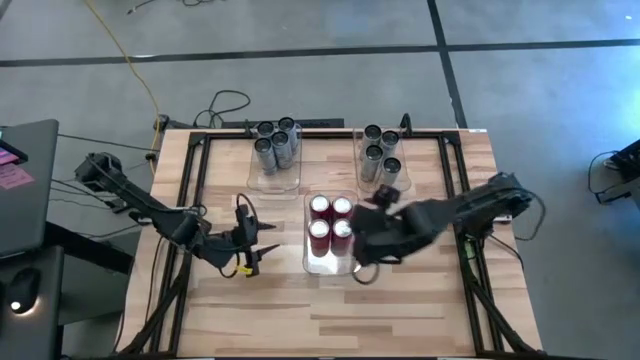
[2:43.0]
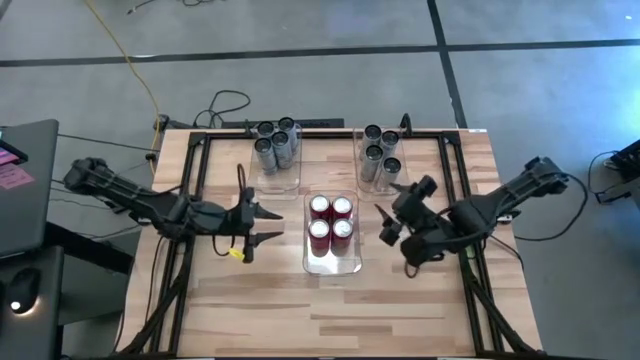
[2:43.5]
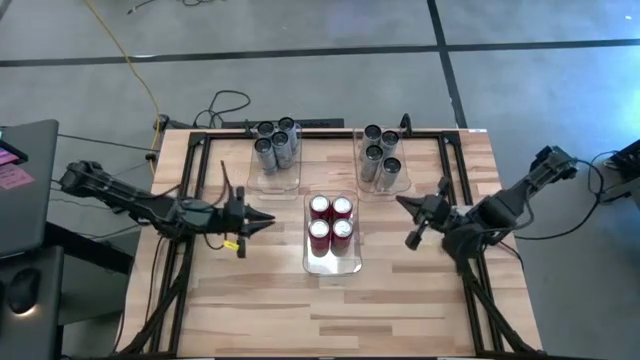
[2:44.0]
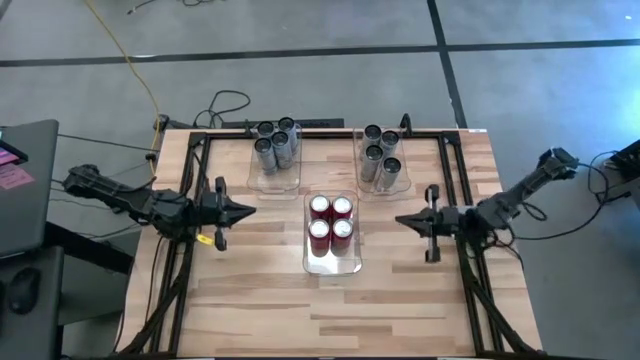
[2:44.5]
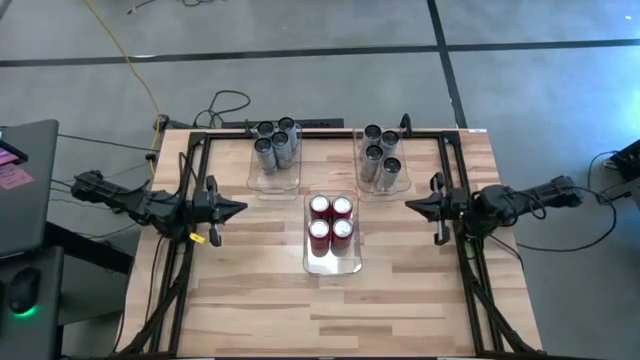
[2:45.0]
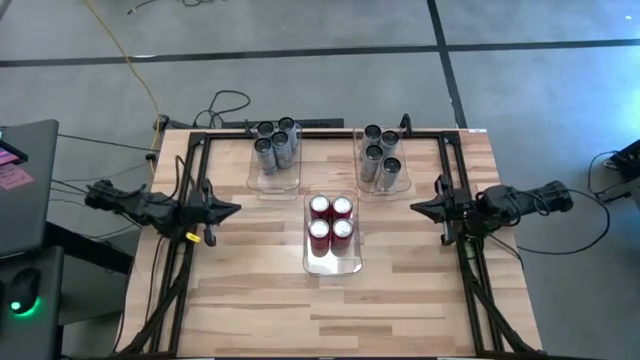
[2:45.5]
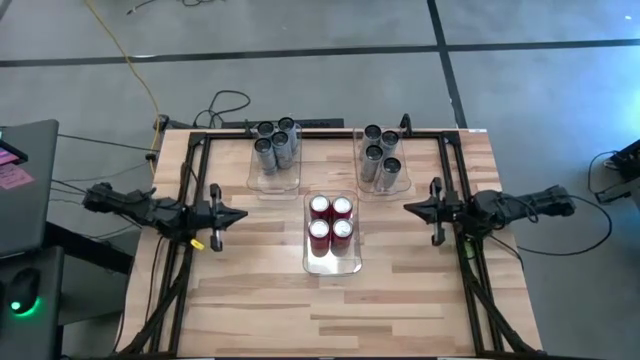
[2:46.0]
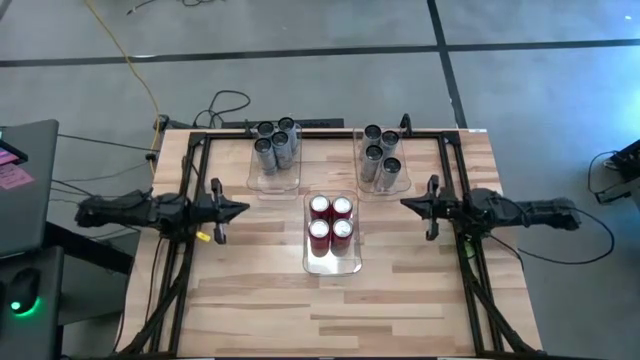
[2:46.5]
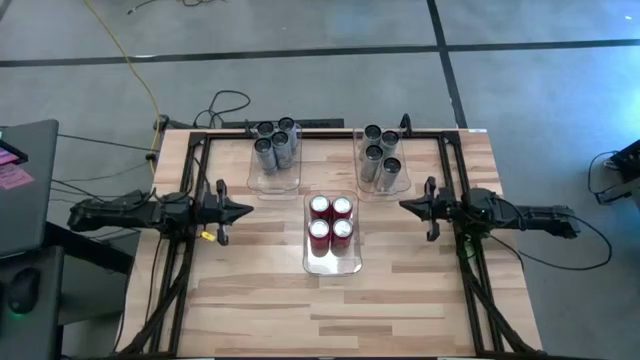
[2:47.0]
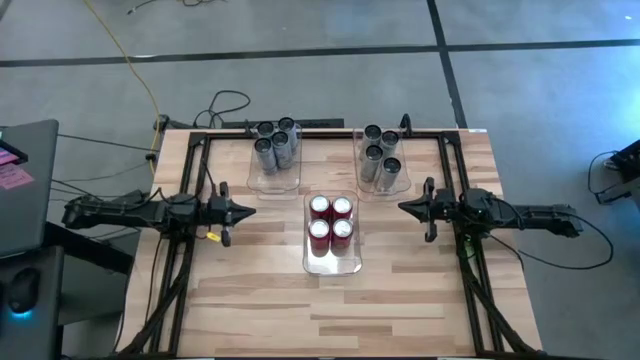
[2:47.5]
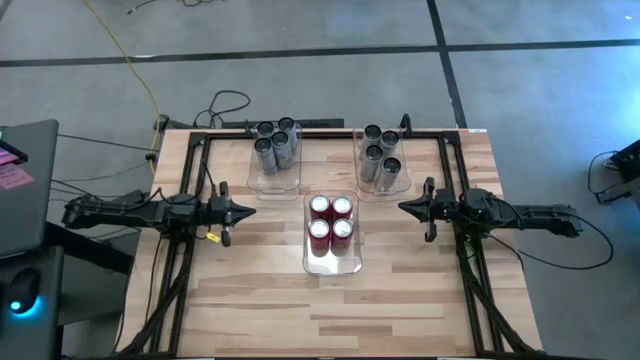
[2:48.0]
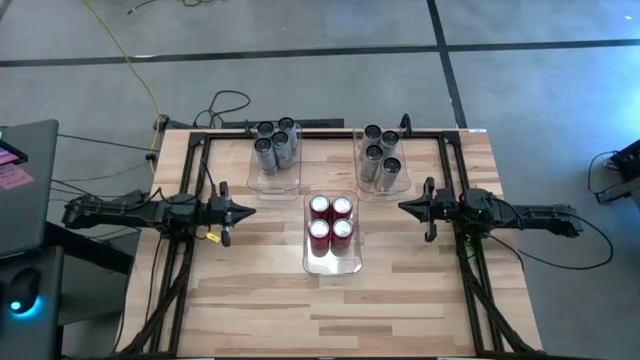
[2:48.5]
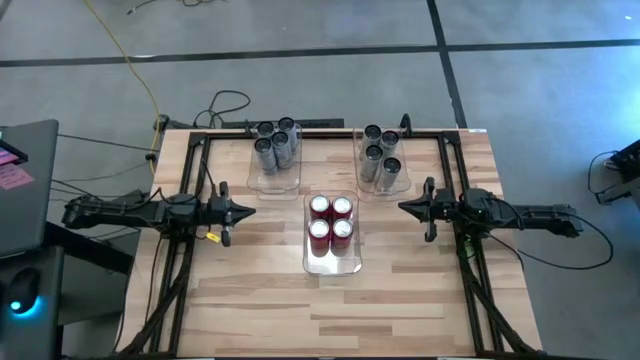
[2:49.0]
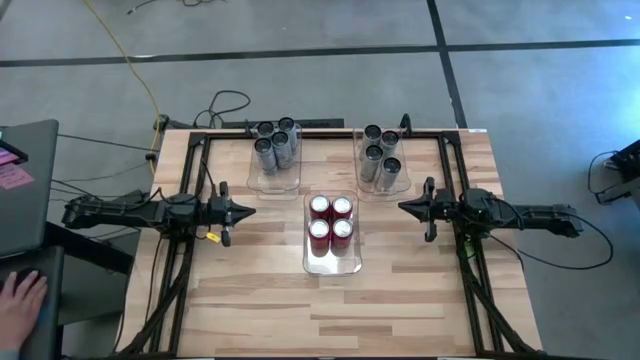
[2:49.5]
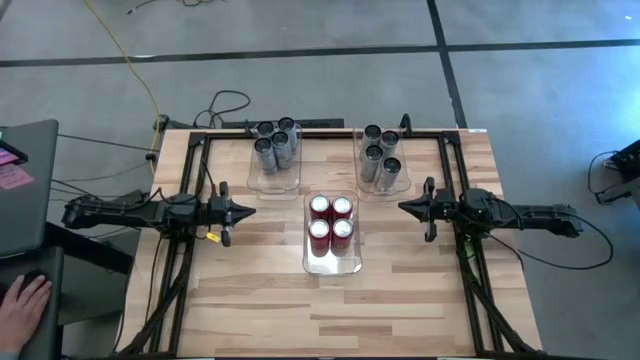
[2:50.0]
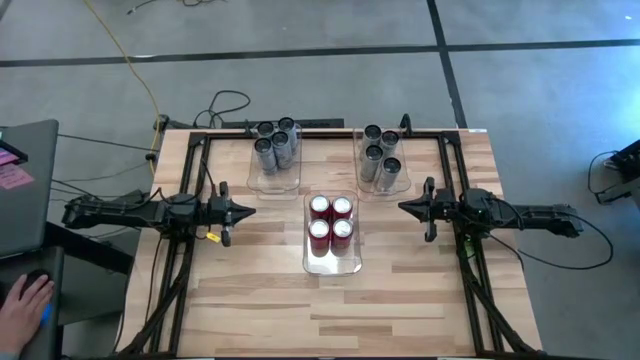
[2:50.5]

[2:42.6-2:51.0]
Task: Sort soda cans
Return to Home Position

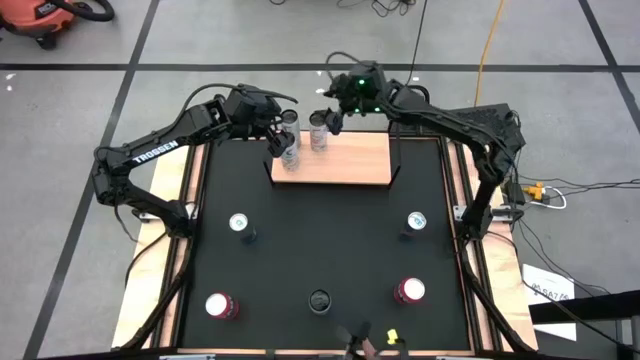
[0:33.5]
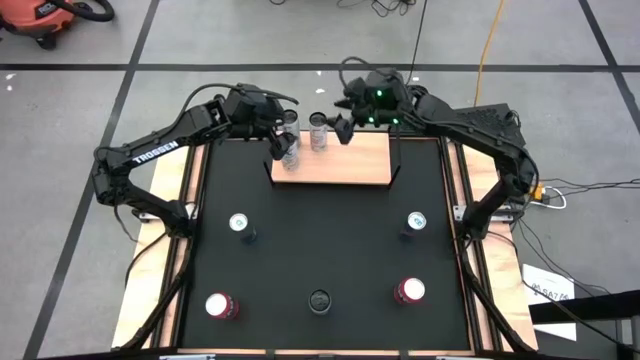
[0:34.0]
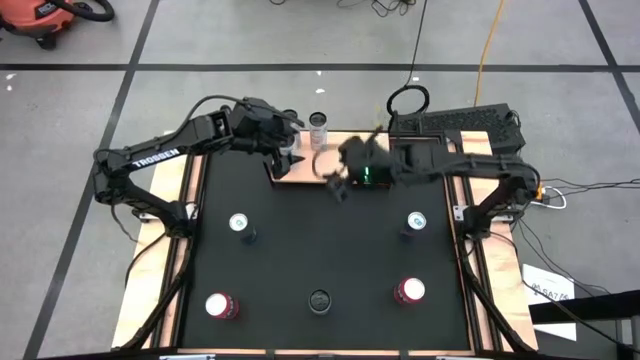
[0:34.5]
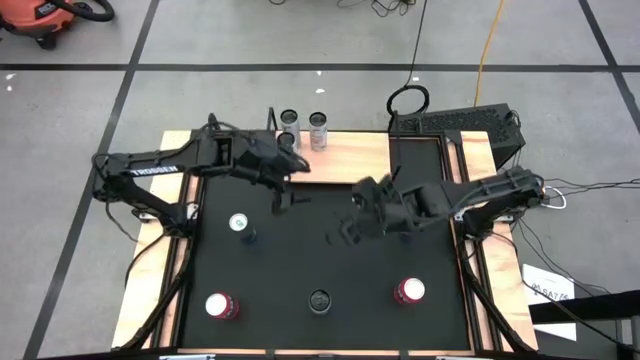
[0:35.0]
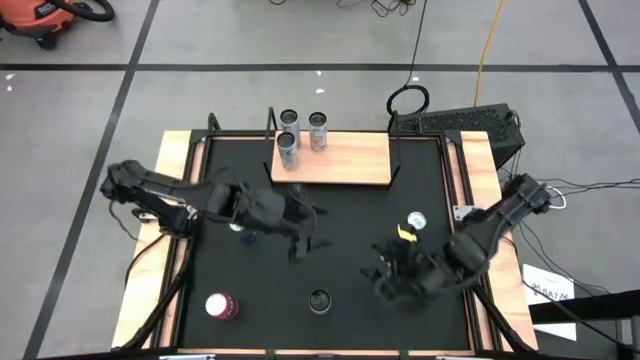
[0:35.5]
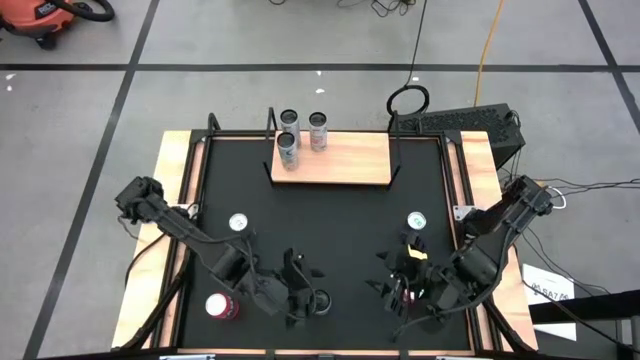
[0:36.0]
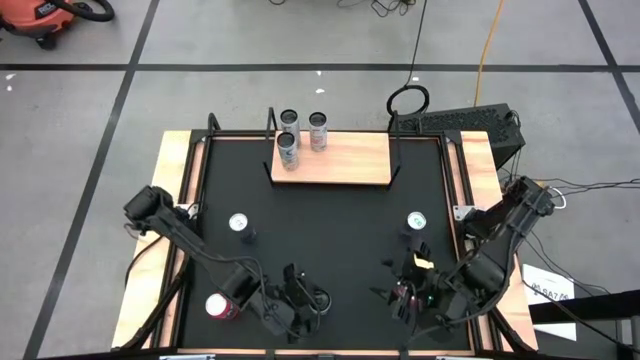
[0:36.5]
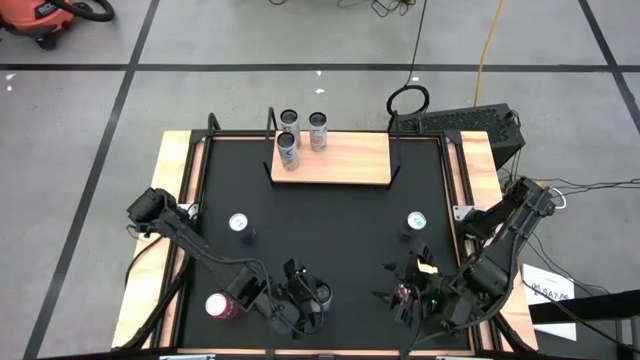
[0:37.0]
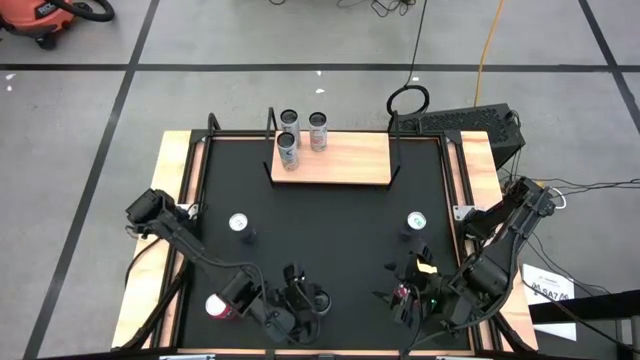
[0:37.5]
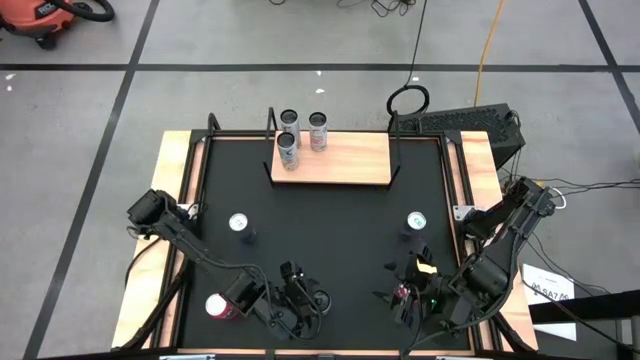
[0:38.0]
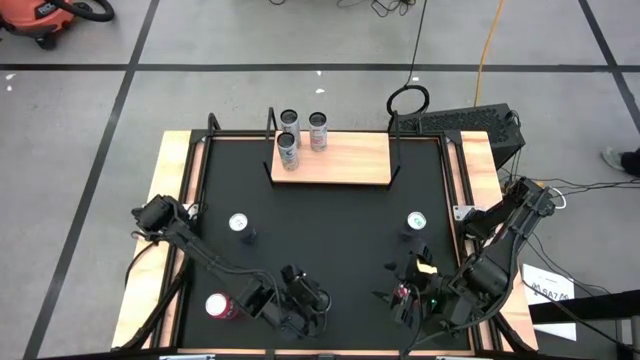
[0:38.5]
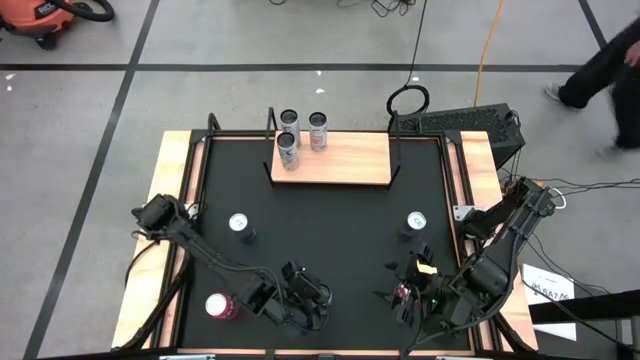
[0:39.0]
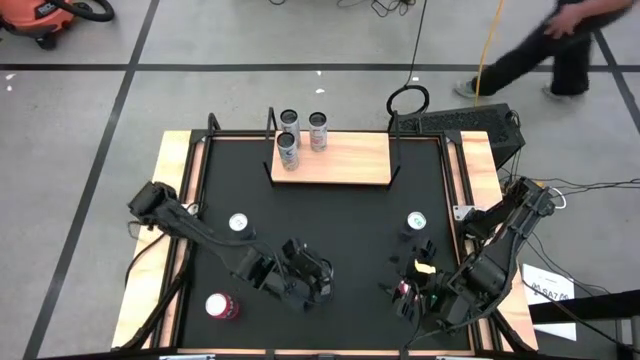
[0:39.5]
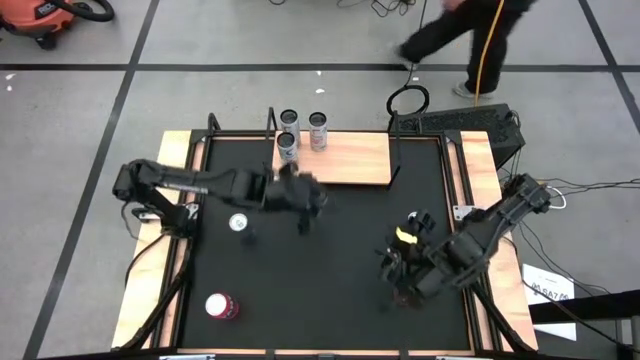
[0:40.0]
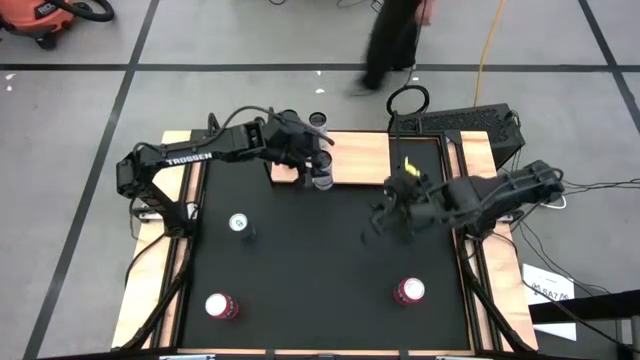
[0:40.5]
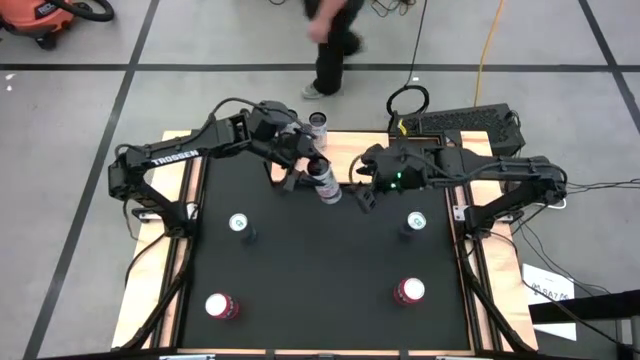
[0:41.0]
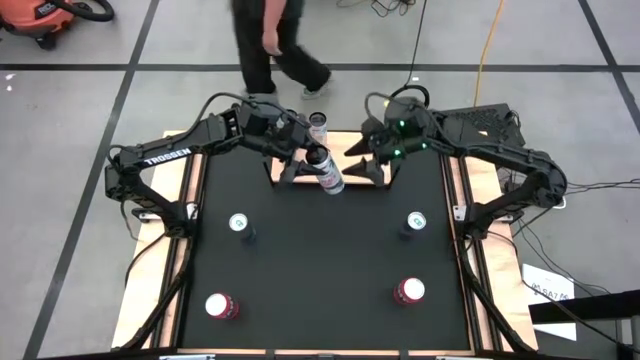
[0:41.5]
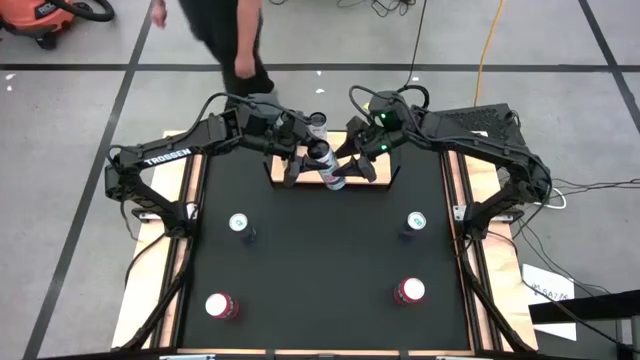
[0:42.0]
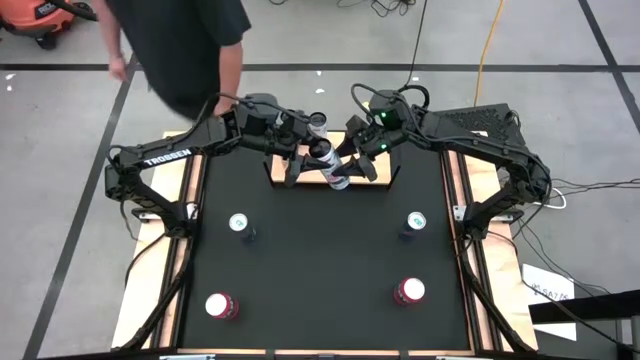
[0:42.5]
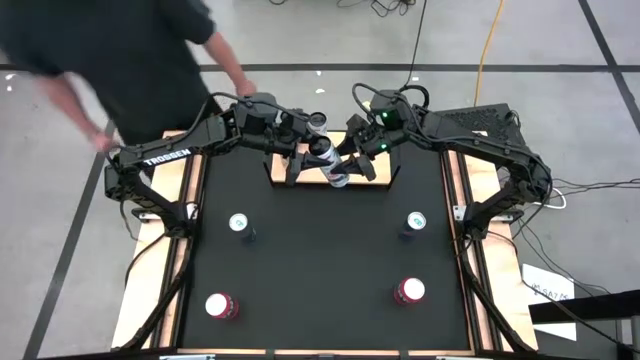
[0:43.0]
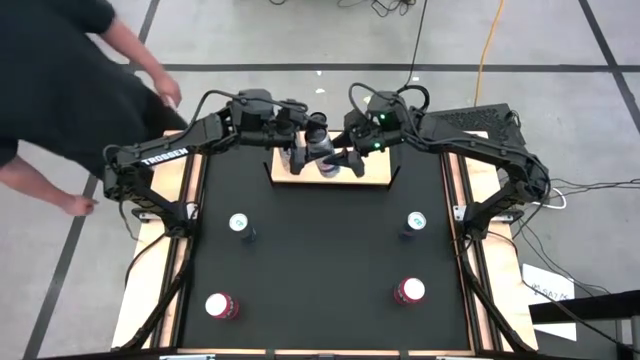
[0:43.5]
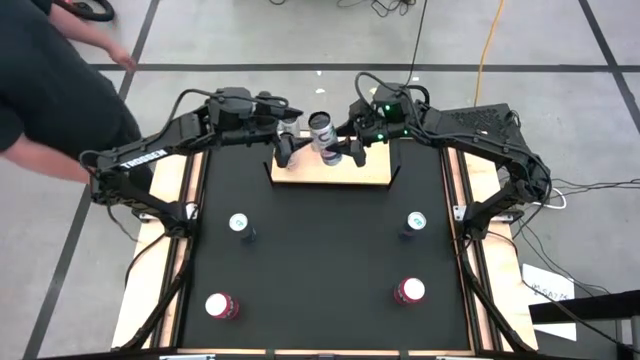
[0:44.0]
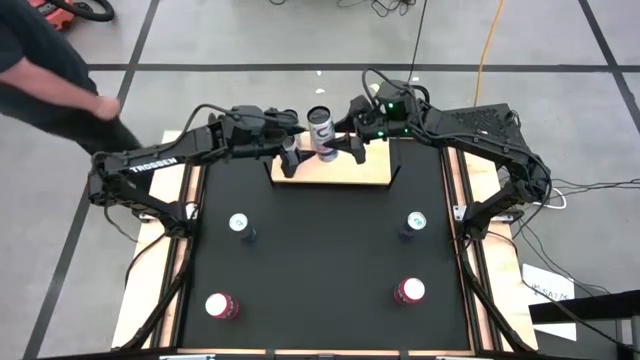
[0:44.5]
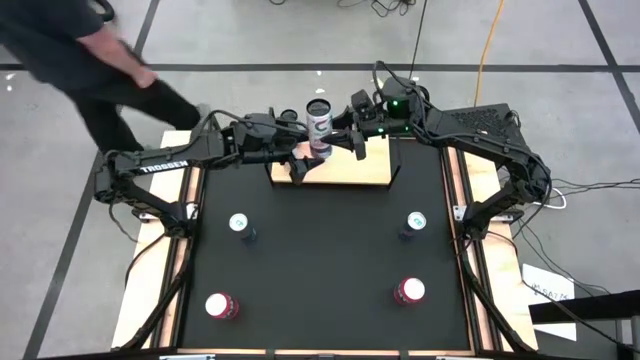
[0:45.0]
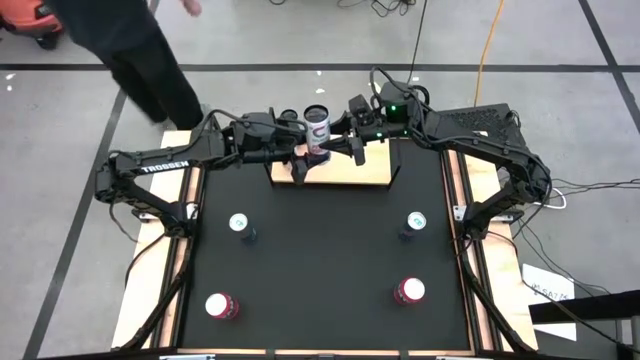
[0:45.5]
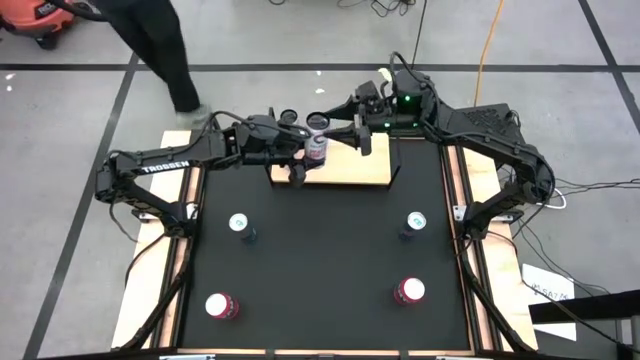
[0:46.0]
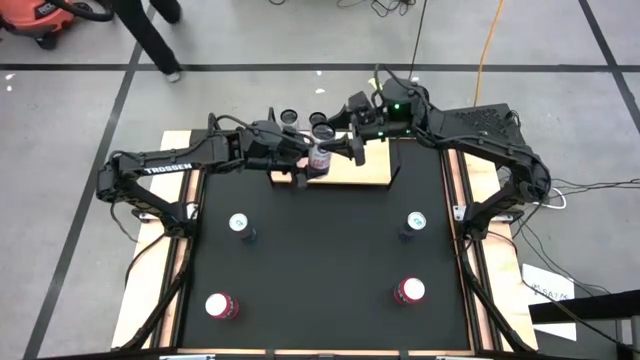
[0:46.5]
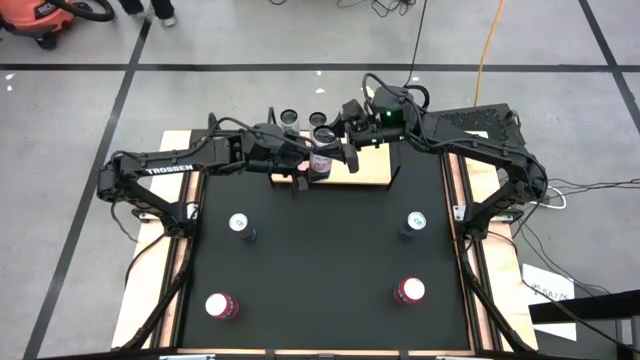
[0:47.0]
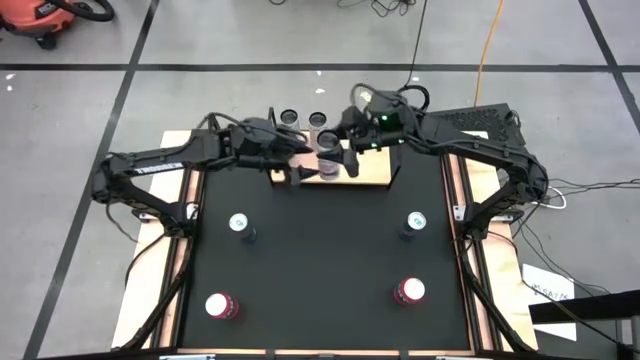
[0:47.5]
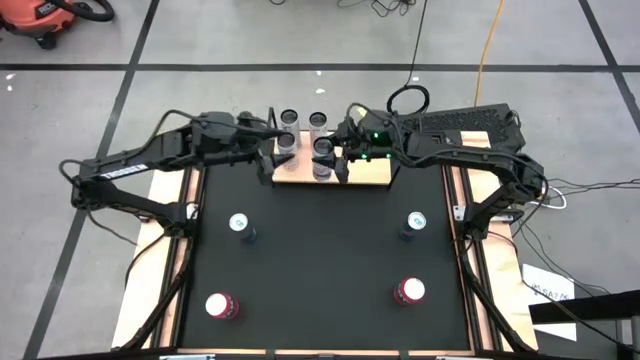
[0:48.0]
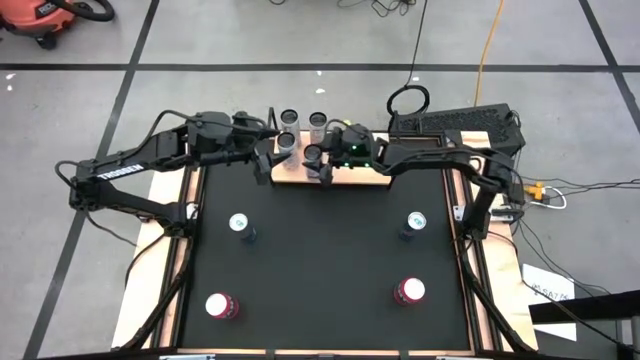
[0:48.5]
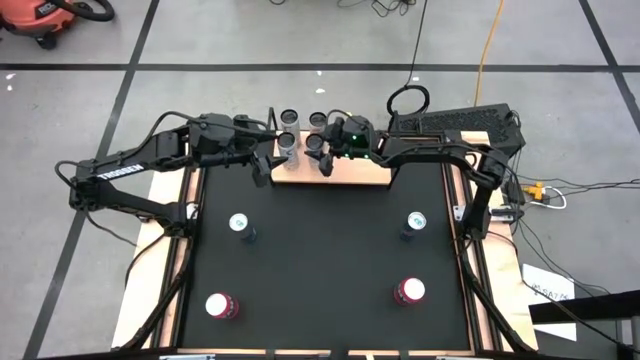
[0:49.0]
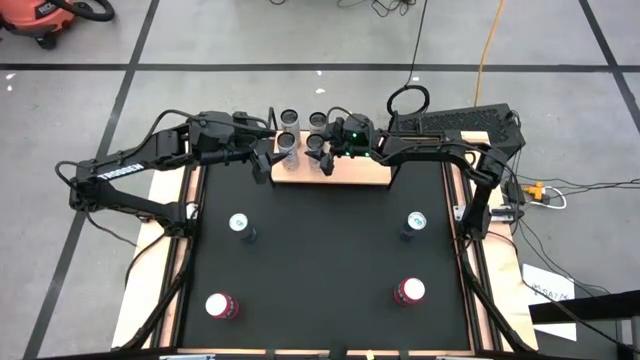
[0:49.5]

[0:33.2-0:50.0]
Task: Place canned beverage on shelf
Put the white-pink soda can on the shelf aligned with the other white-pink soda can
